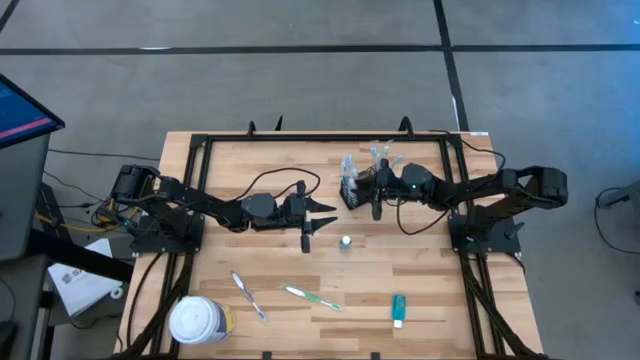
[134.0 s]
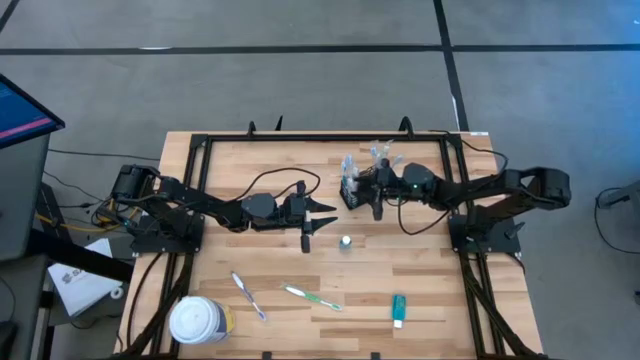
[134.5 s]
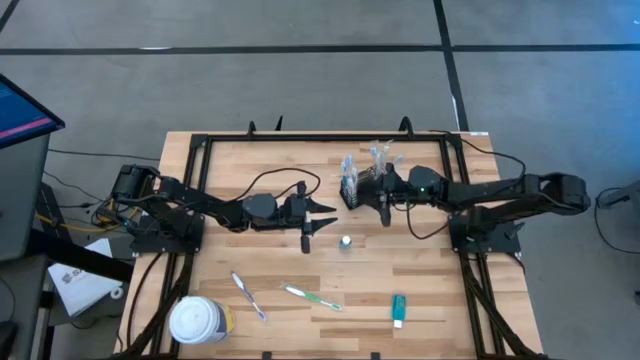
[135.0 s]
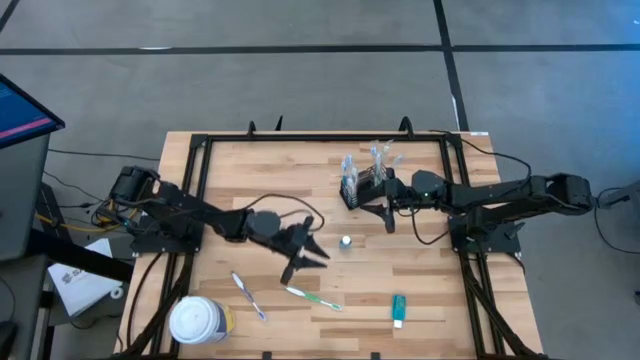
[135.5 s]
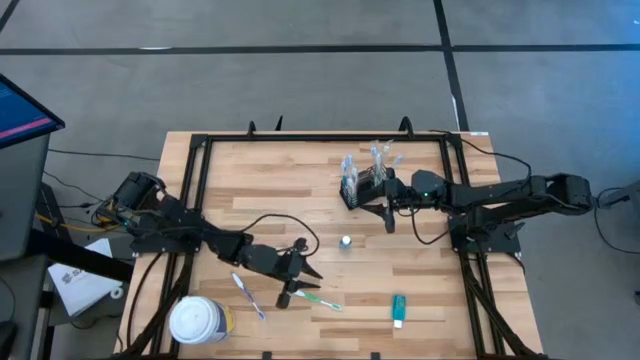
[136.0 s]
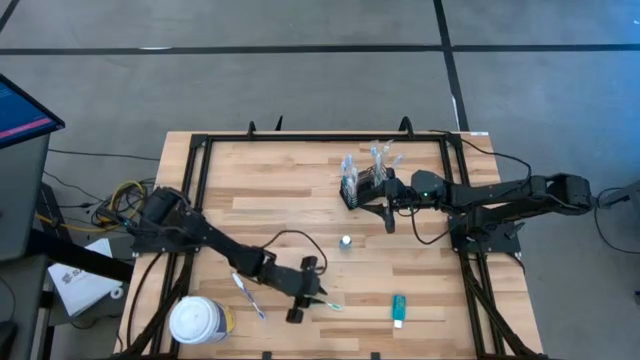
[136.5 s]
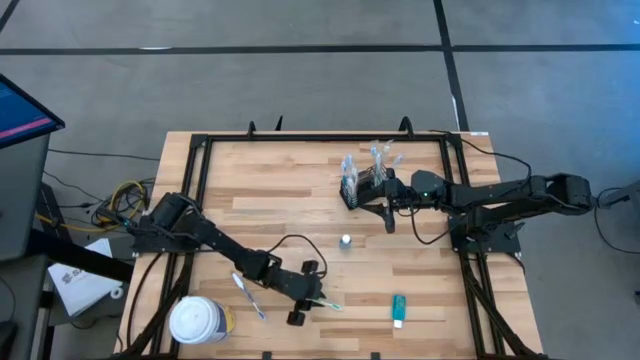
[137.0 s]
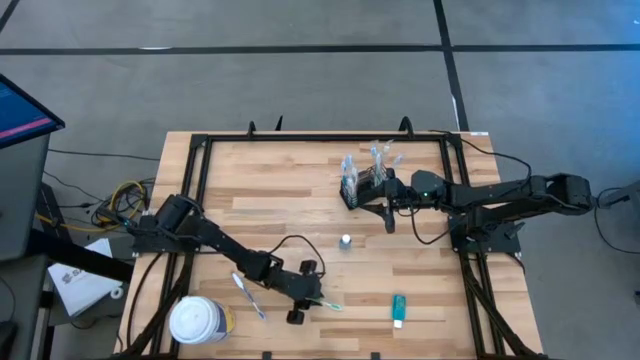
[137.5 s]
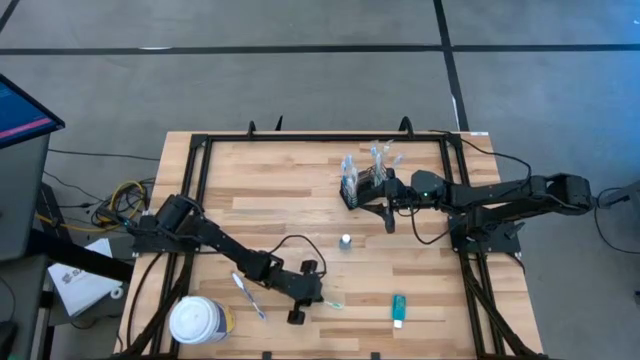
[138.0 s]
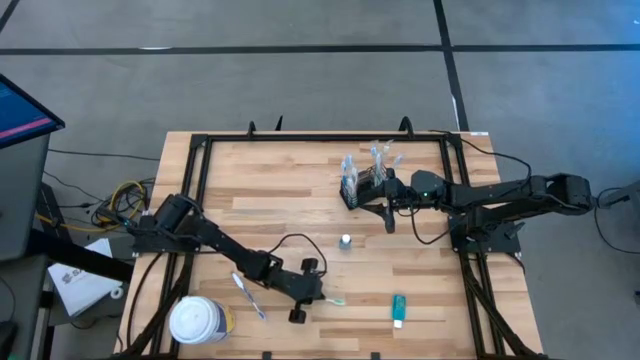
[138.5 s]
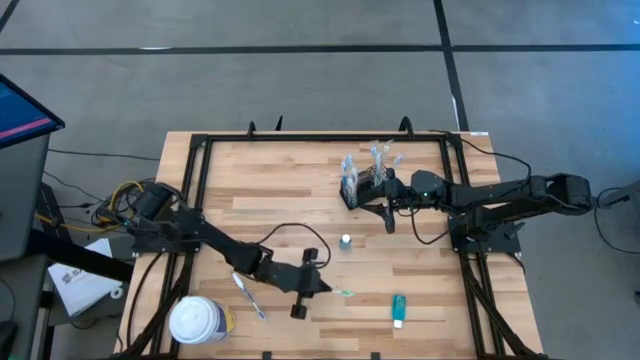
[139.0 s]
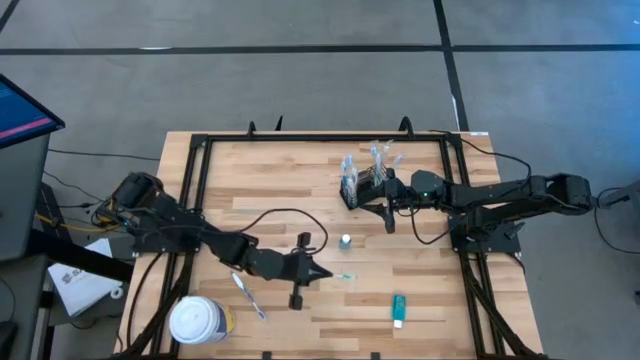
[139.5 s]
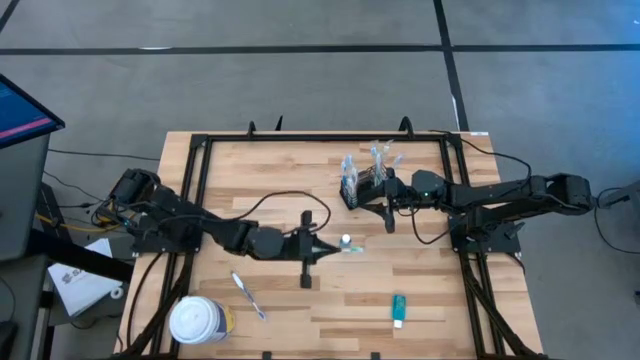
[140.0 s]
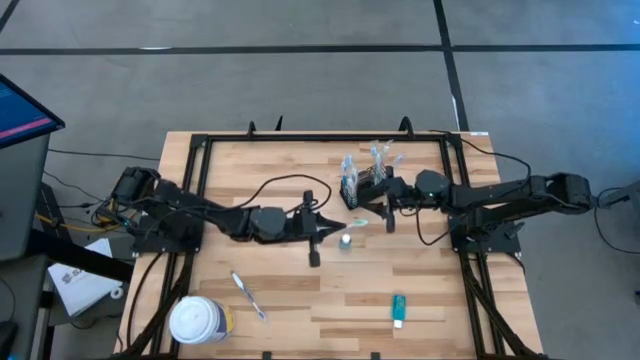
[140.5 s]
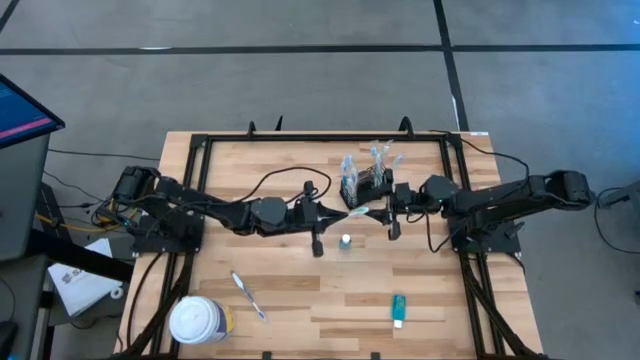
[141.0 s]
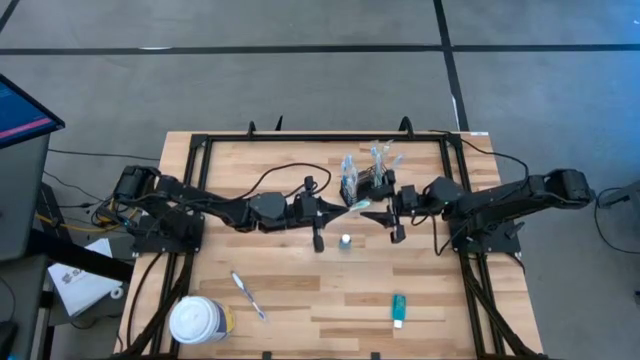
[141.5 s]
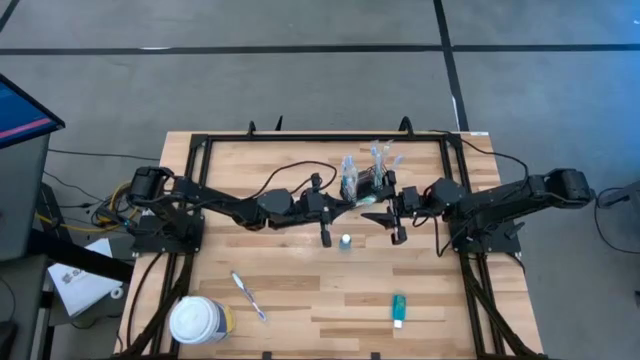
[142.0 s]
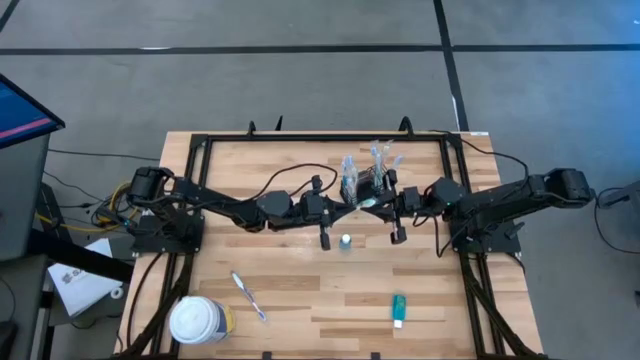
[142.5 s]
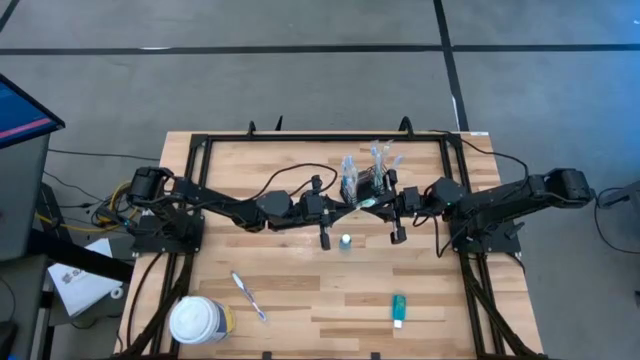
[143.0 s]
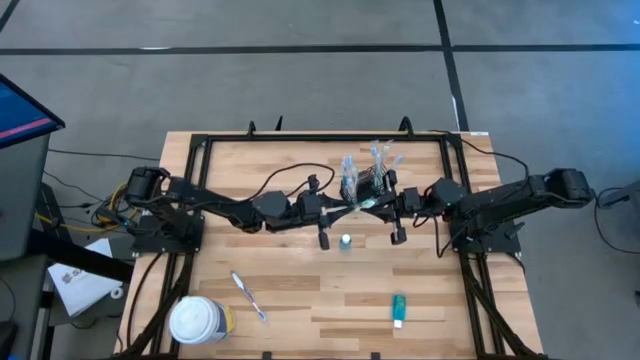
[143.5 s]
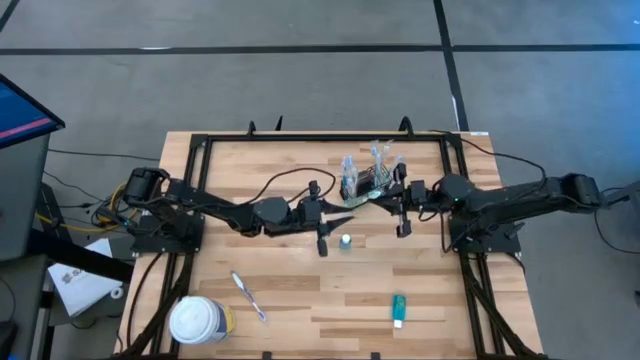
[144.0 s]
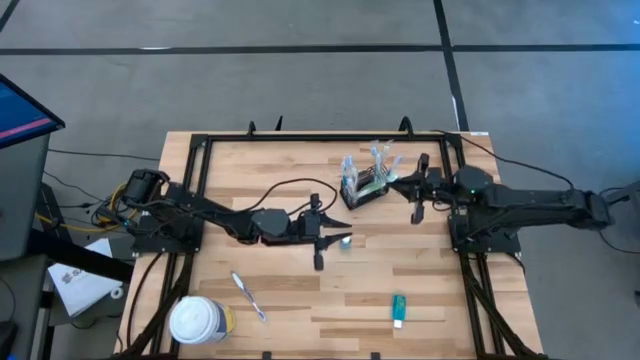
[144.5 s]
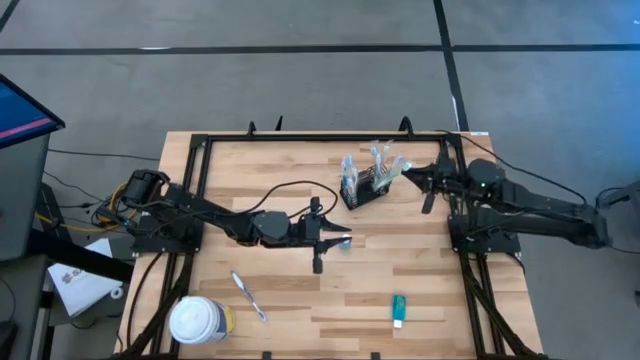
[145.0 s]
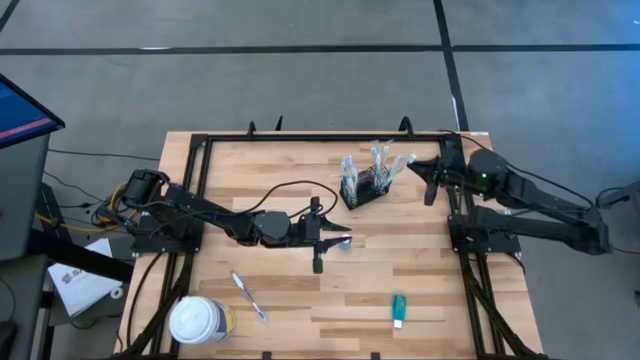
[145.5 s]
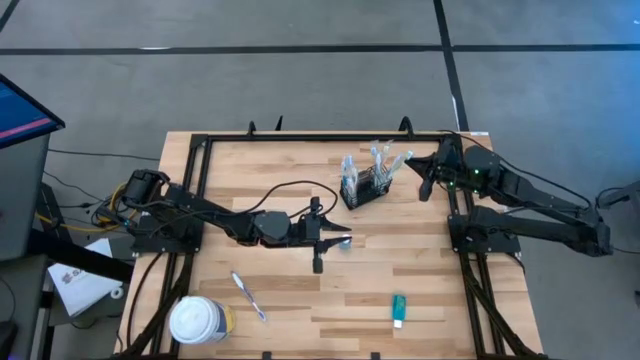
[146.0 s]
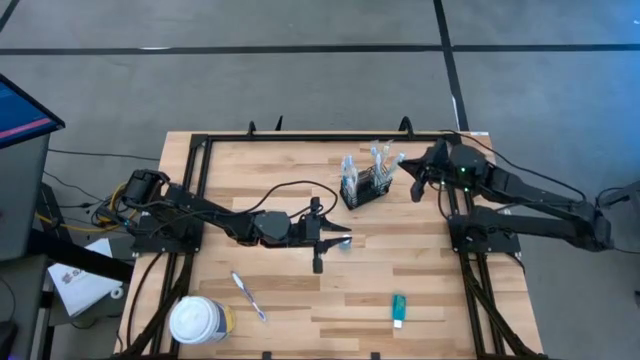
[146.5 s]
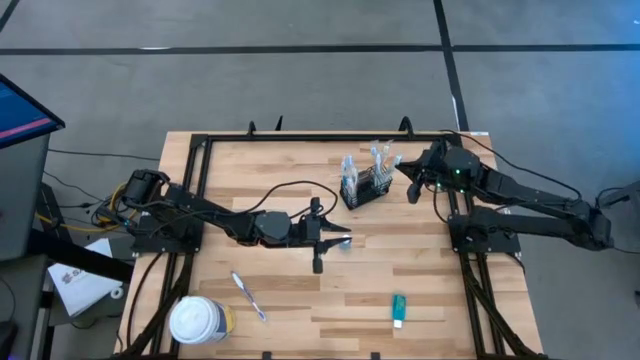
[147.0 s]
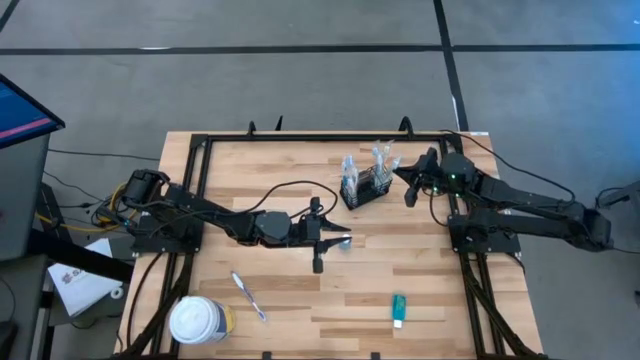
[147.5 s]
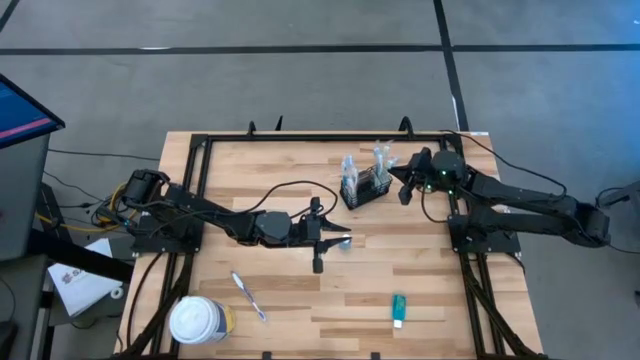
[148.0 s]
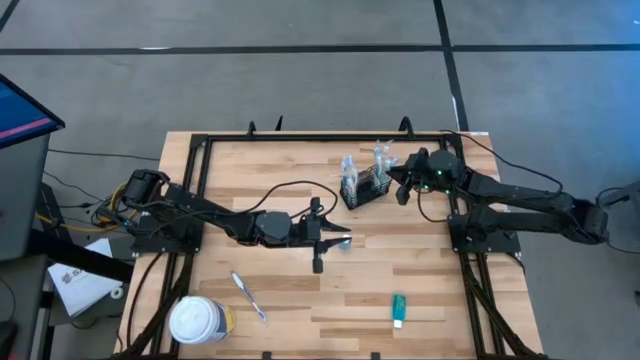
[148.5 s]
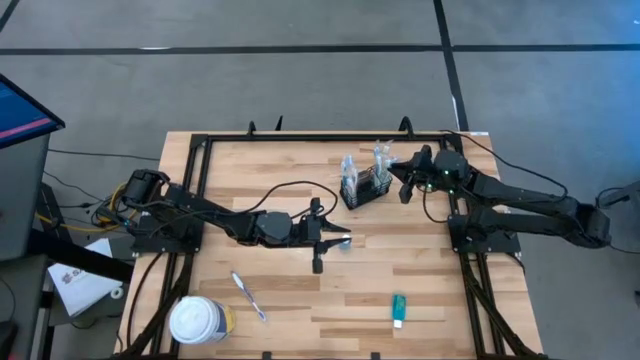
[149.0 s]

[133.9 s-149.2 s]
Task: Pick & Place toothbrushing station
Put the green toothbrush into the mesh organizer

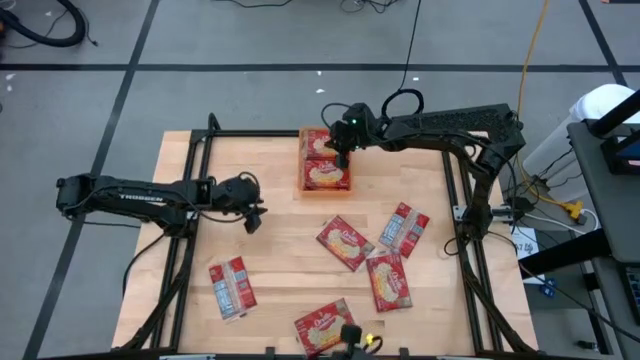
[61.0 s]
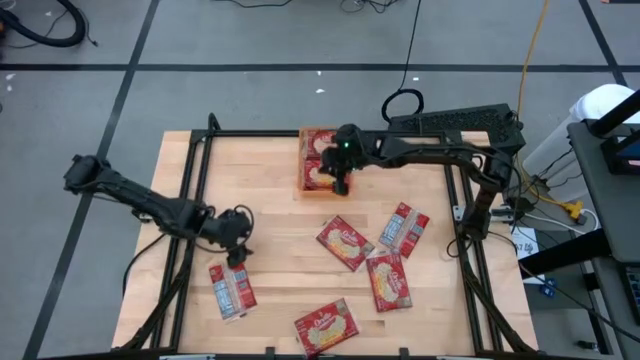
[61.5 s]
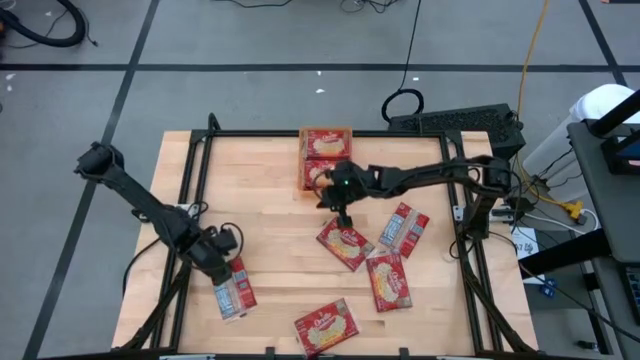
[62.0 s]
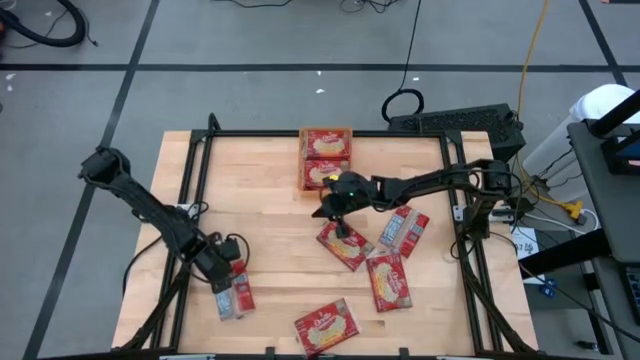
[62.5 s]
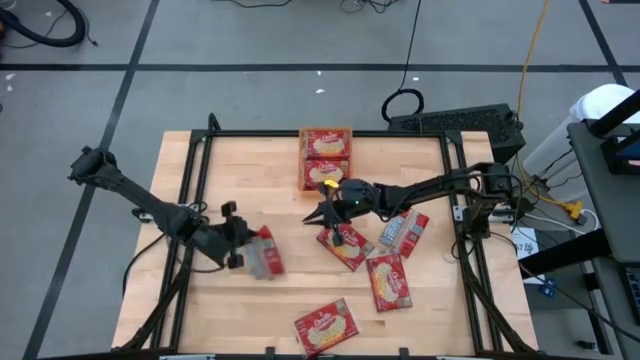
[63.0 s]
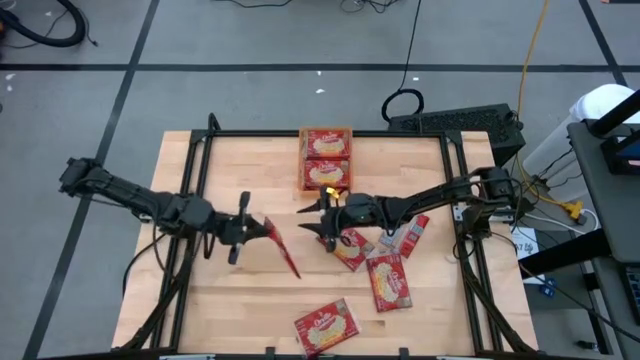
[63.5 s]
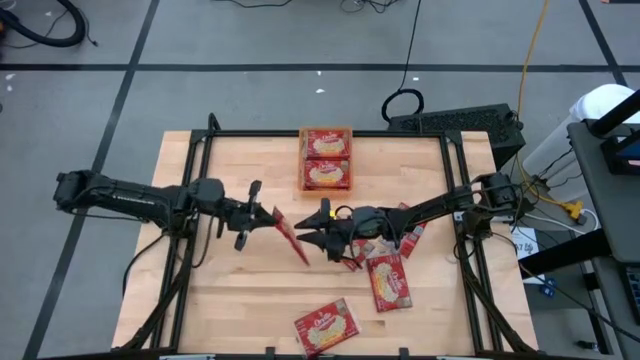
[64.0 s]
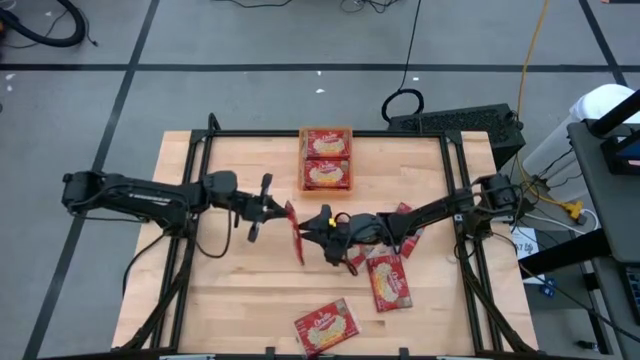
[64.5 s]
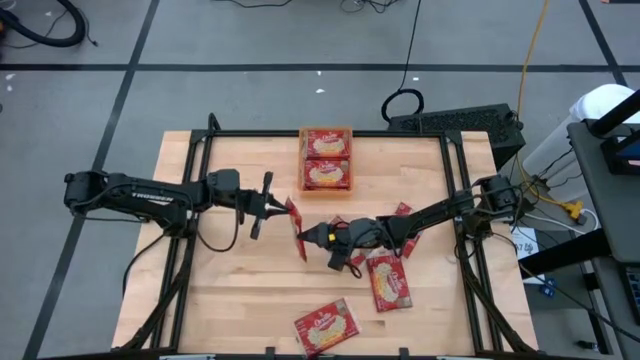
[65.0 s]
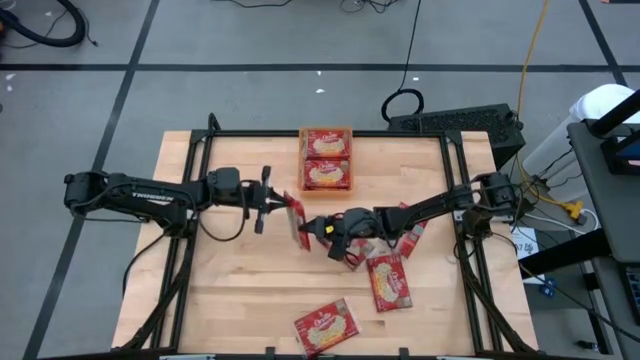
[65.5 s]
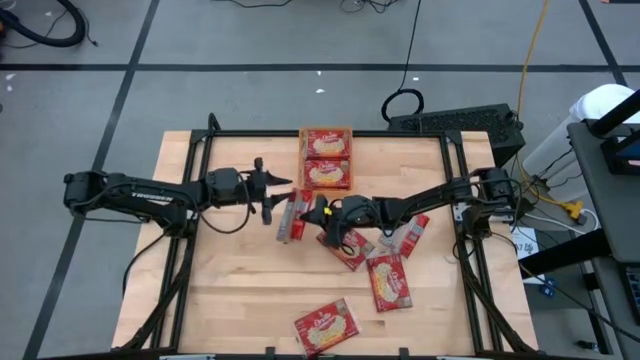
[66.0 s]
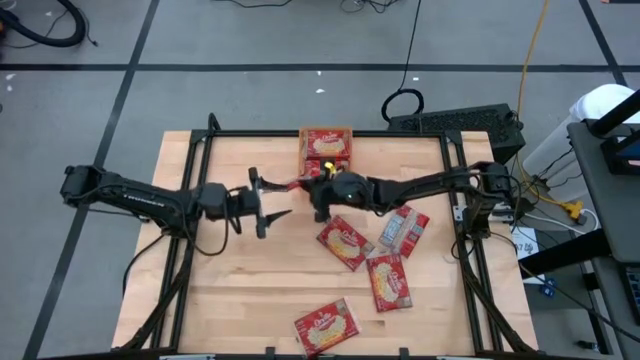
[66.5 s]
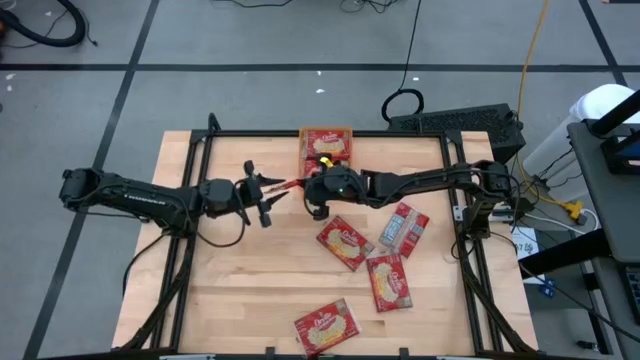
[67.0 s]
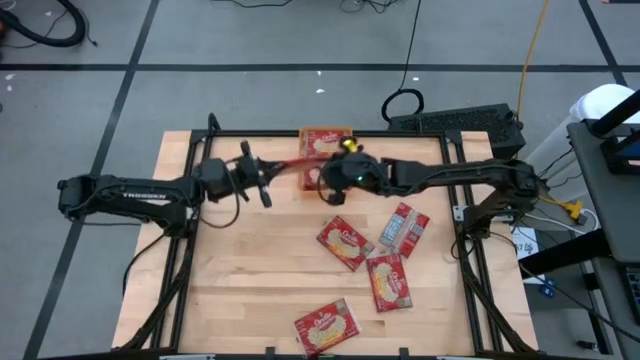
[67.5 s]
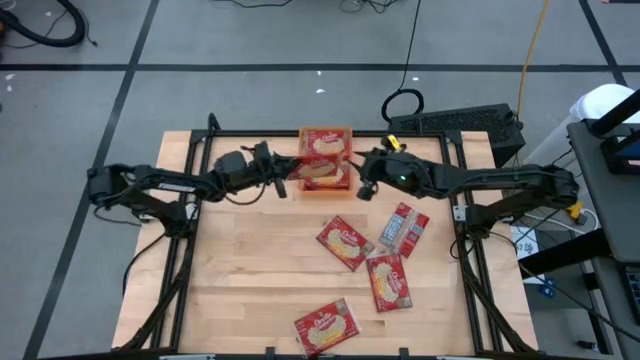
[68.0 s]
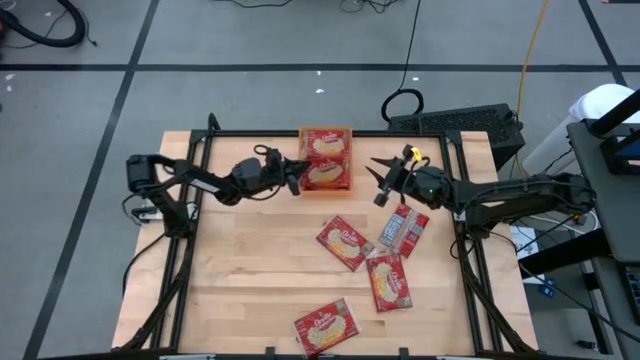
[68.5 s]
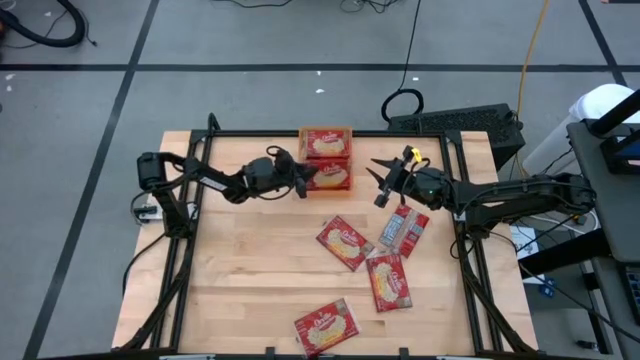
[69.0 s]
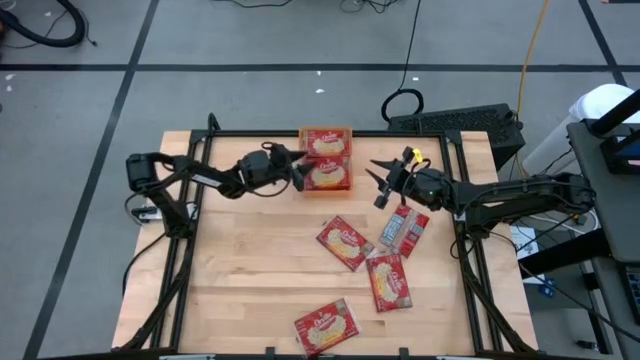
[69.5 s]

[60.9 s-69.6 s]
Task: Sort popcorn bags into baskets
Put the red popcorn bag into the orange bin
